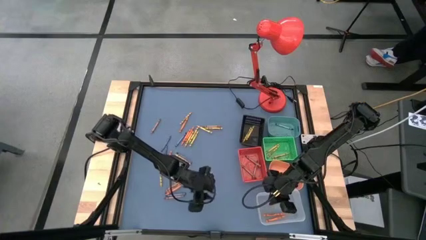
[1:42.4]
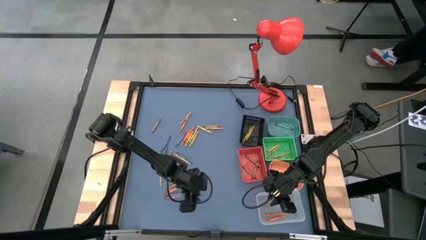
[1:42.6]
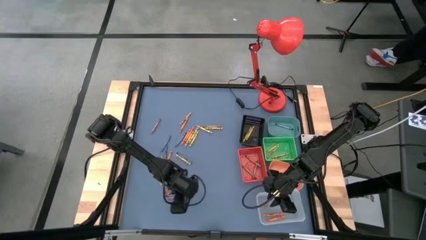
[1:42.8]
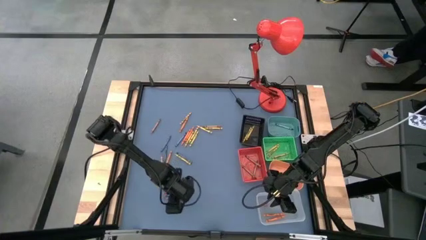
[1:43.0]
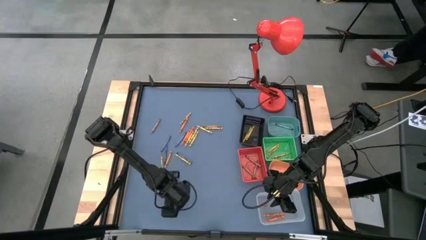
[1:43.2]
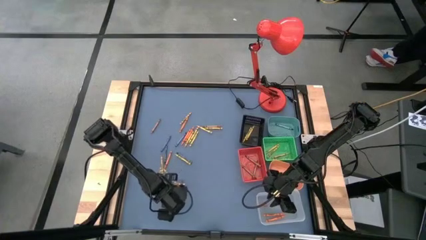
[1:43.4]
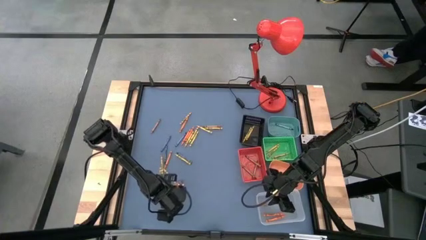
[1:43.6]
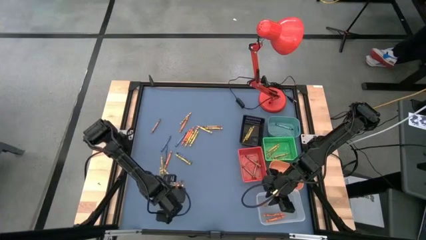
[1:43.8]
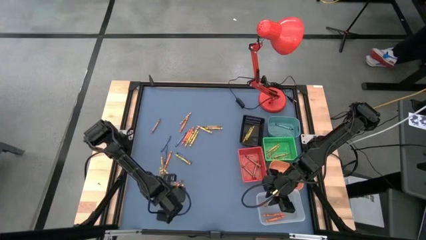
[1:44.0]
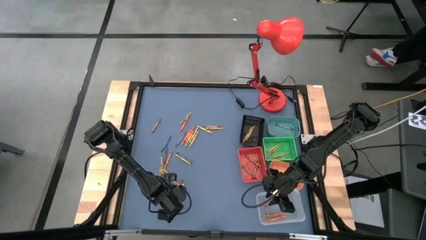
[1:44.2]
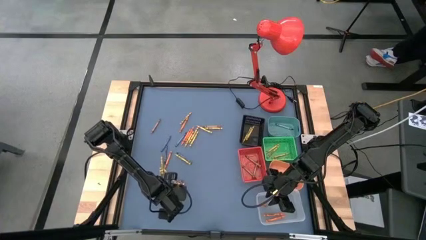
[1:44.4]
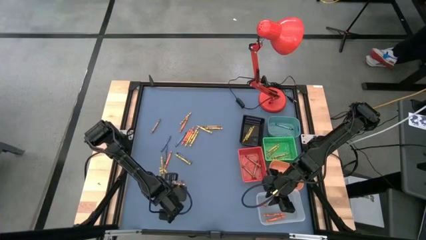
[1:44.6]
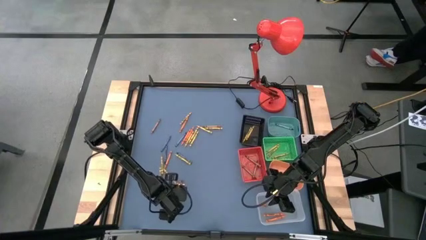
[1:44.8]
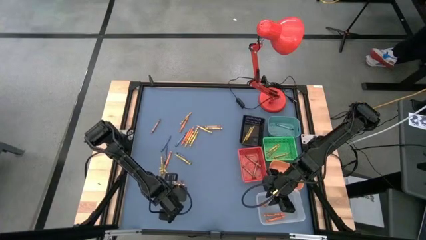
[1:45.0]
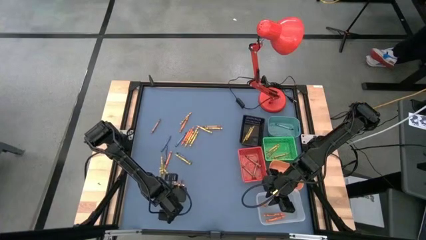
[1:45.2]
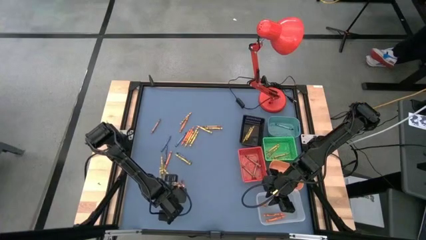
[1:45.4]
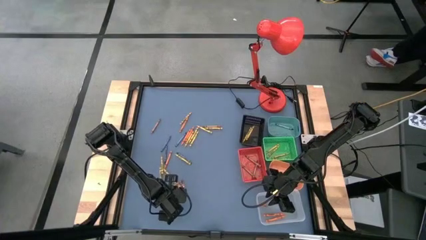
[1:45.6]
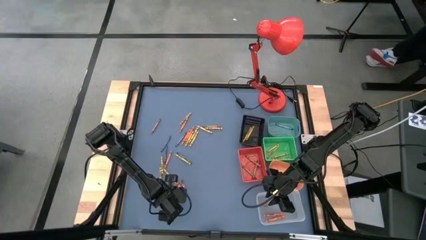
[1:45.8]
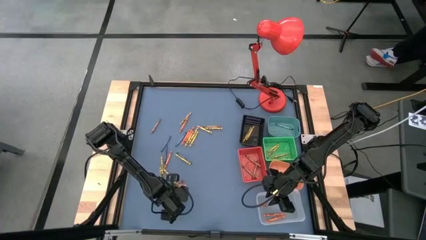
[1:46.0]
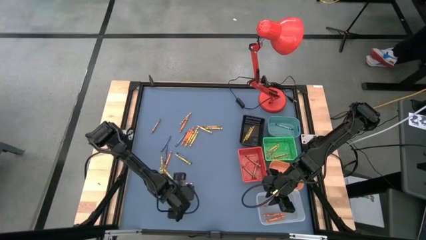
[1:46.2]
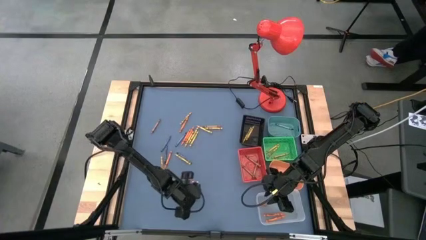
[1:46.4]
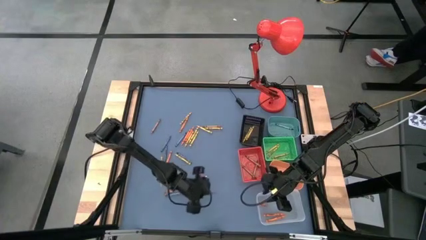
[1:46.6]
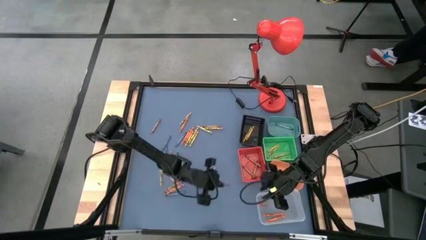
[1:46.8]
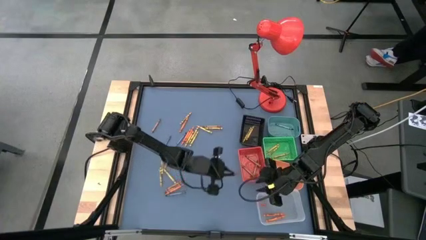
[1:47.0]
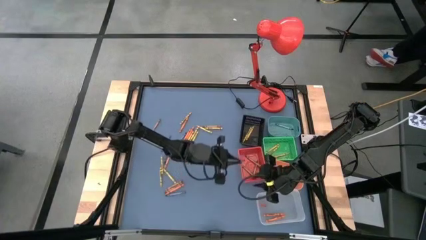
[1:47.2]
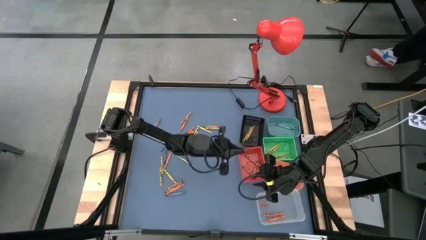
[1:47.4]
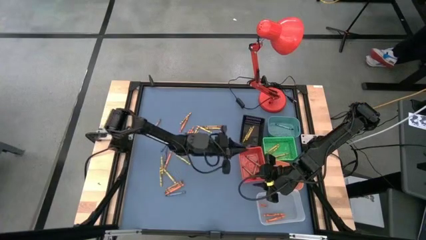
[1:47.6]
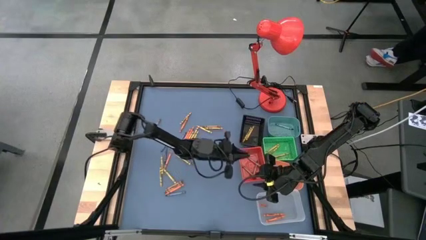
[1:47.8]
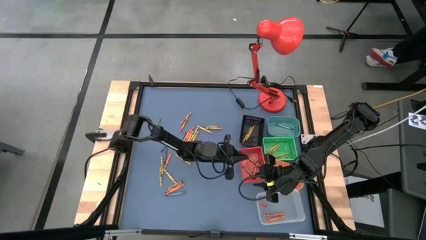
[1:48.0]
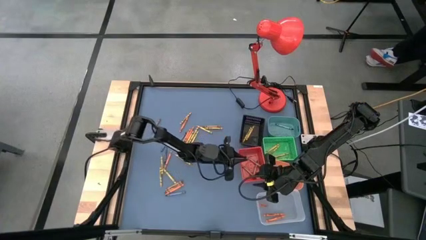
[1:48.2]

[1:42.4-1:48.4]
Task: Sort crayons
Put the brown crayon into the red basket

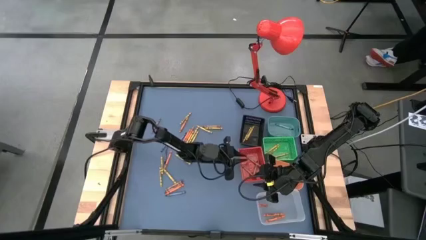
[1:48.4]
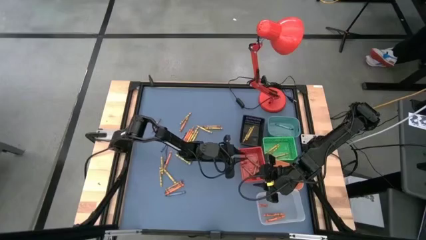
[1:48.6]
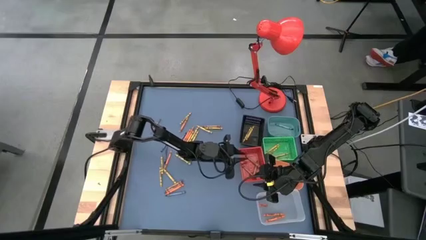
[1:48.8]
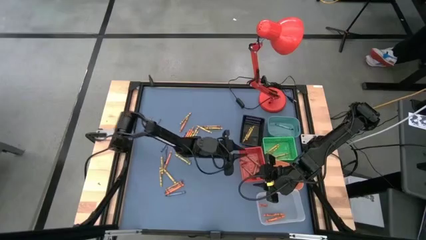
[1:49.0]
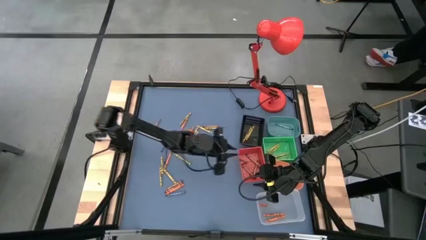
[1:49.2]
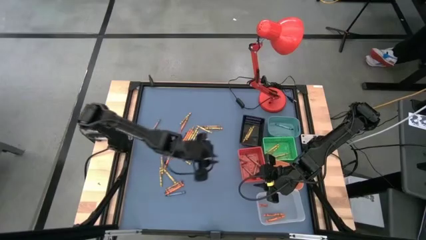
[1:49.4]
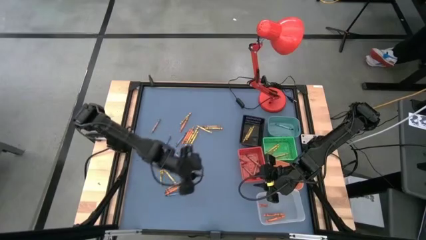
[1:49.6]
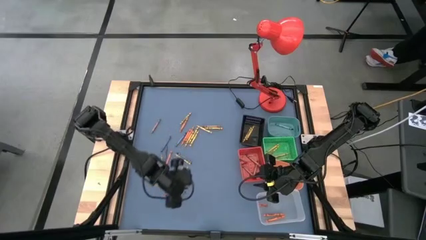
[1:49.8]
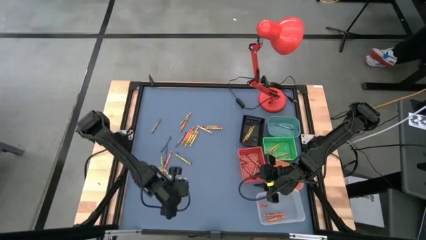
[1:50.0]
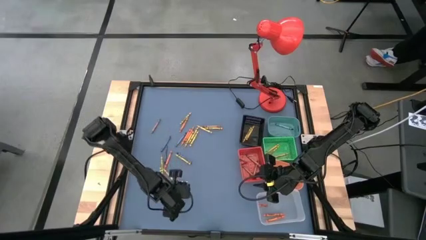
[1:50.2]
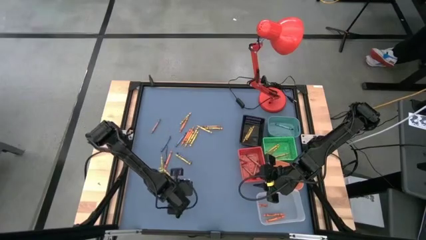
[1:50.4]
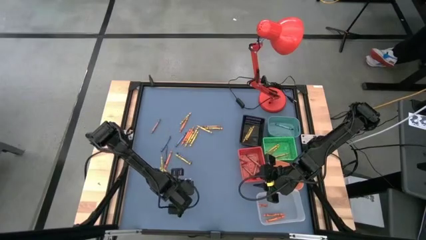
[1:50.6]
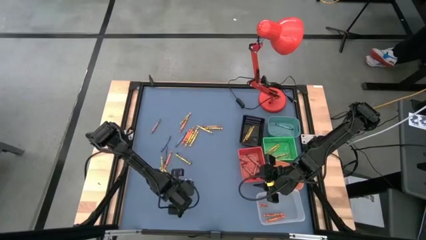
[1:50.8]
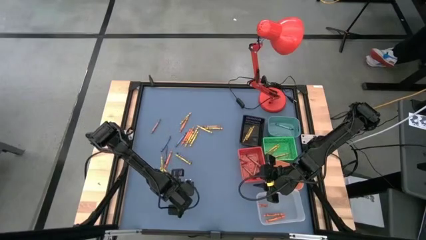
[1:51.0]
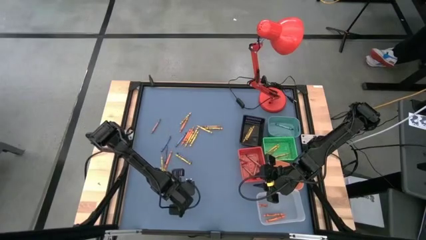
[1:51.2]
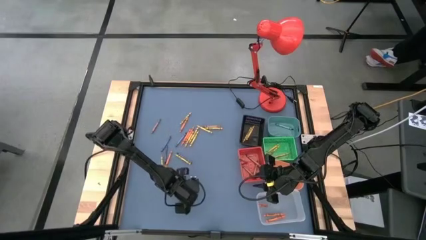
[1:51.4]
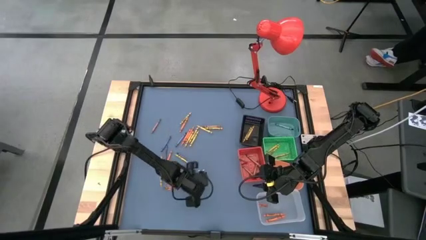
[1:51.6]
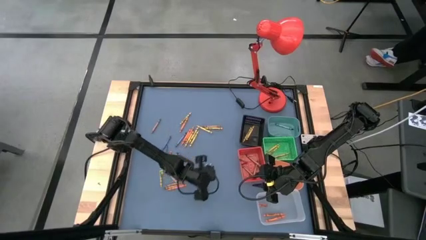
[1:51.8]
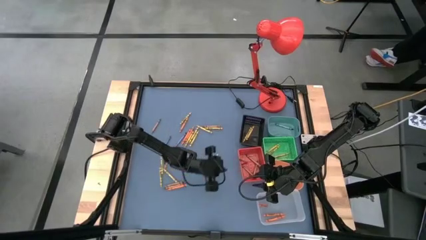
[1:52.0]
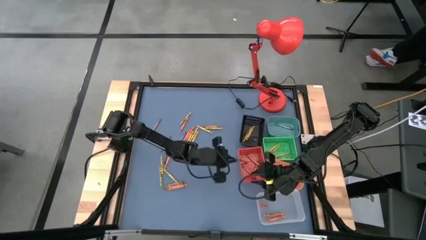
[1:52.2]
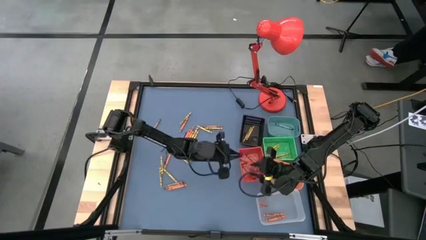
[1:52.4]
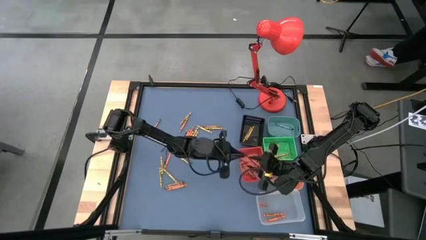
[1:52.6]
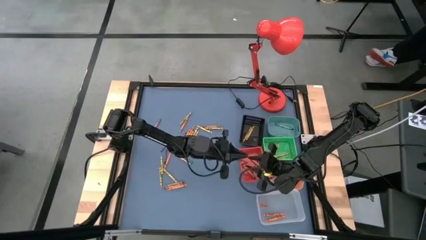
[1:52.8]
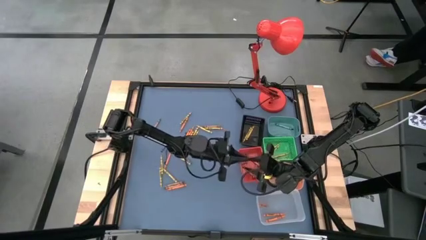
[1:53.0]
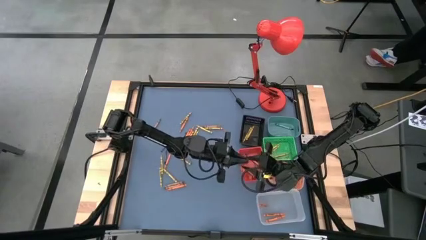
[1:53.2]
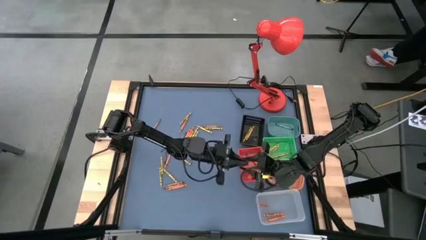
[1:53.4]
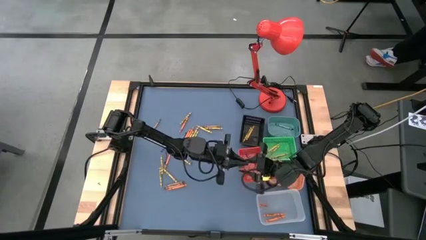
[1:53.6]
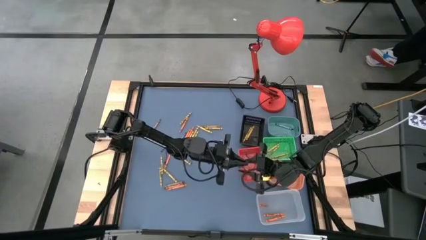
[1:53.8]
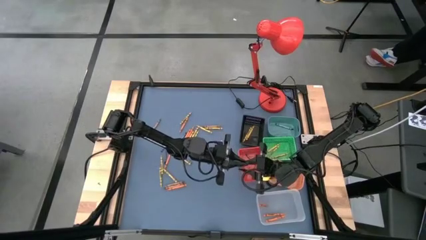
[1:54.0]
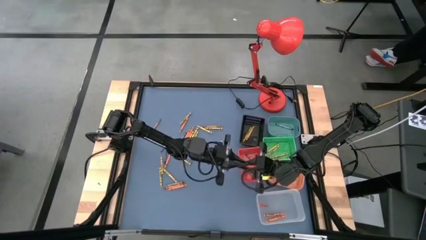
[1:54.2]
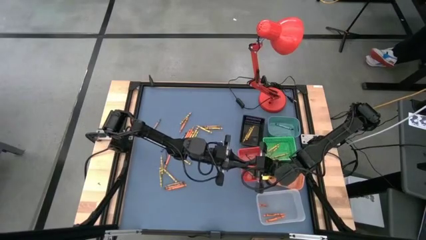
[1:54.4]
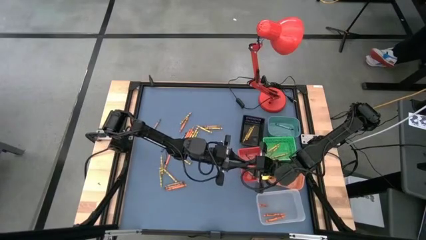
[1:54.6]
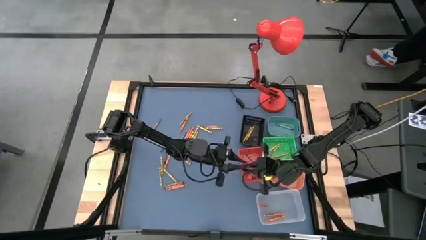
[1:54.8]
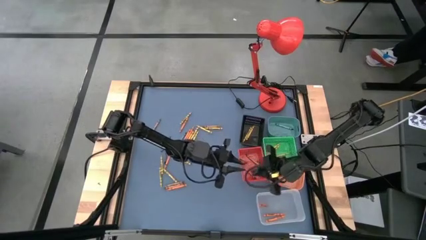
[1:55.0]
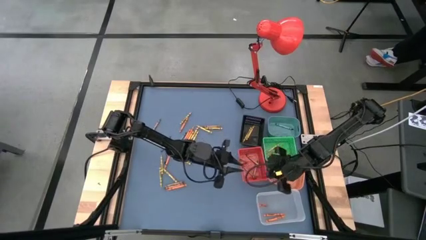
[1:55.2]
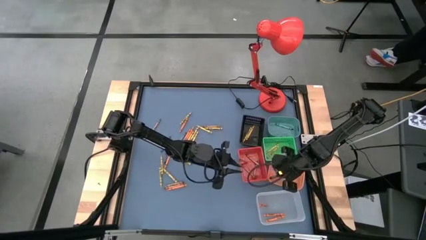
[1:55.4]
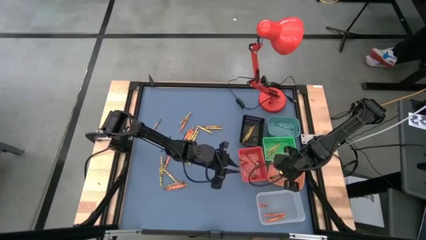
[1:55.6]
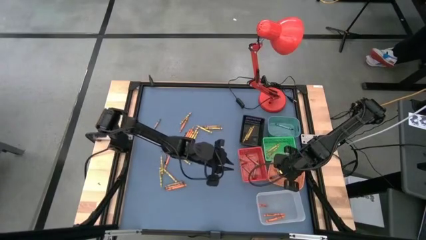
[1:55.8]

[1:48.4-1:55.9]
Put the blue crayon into the orange bin

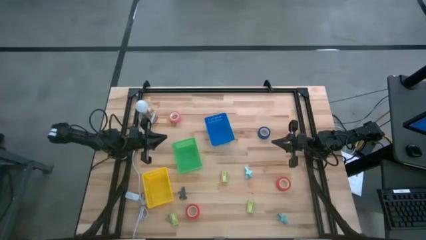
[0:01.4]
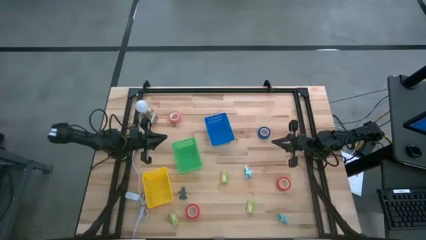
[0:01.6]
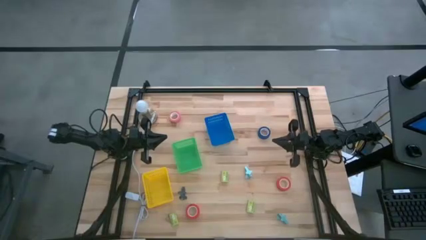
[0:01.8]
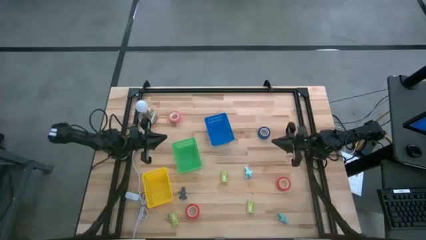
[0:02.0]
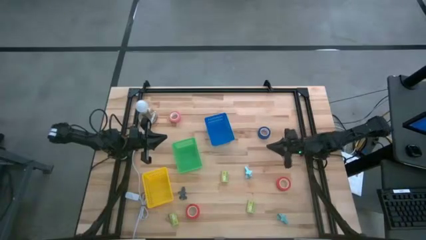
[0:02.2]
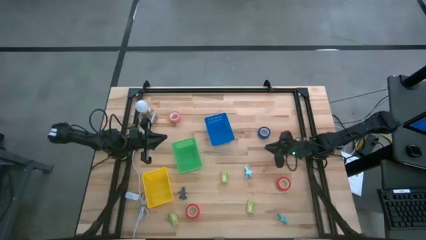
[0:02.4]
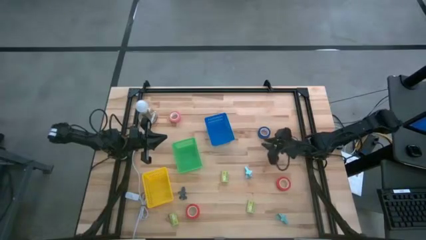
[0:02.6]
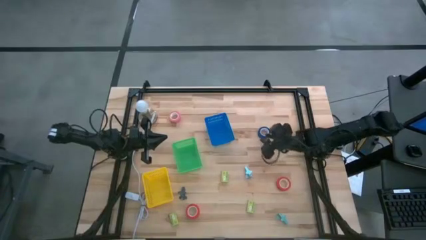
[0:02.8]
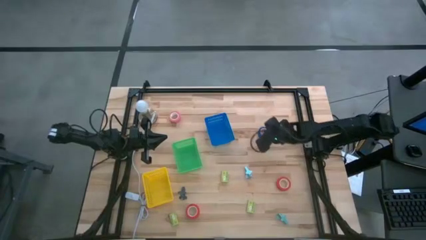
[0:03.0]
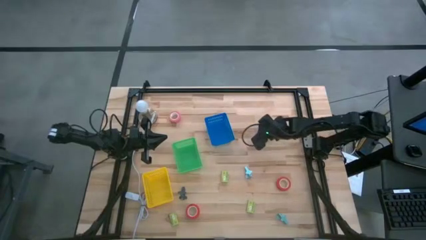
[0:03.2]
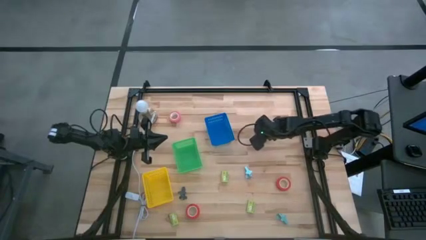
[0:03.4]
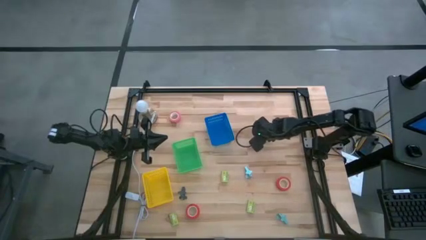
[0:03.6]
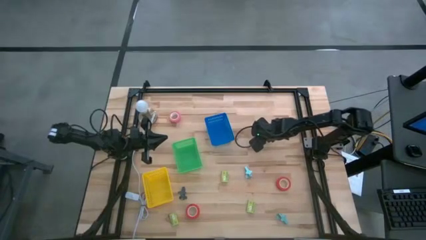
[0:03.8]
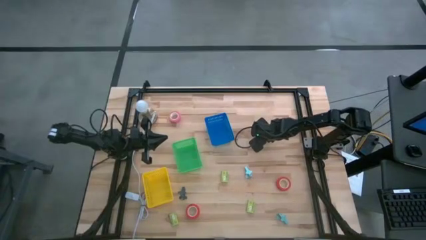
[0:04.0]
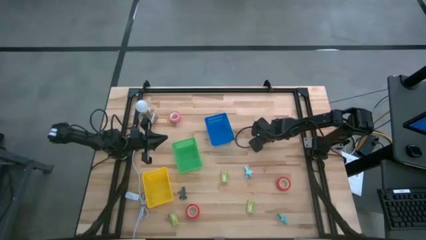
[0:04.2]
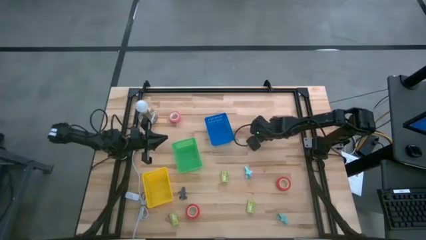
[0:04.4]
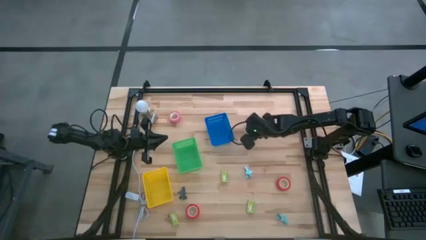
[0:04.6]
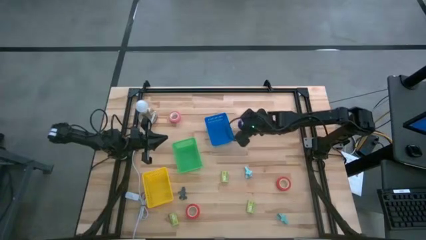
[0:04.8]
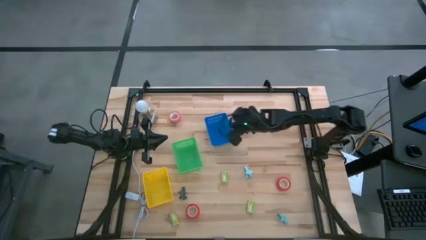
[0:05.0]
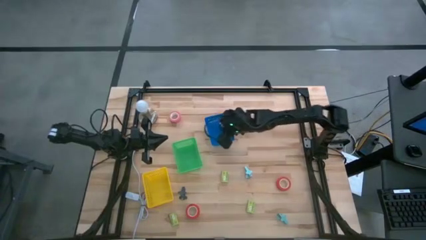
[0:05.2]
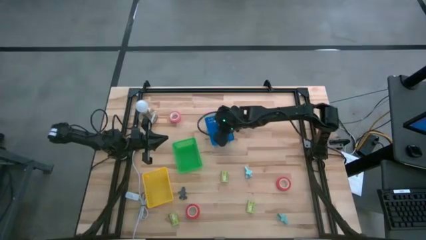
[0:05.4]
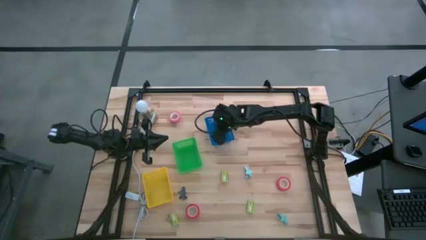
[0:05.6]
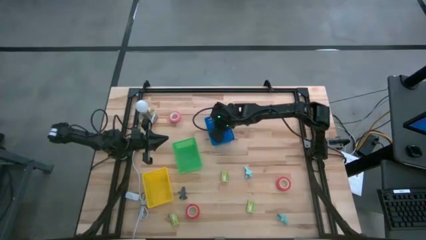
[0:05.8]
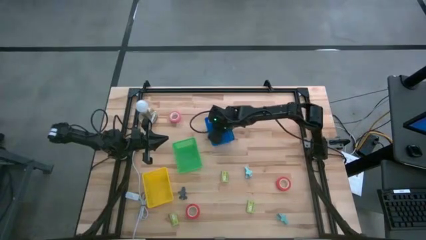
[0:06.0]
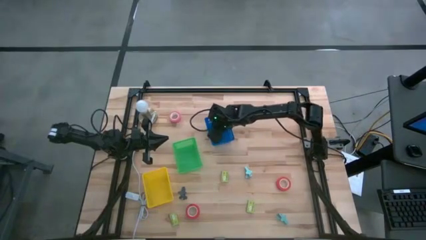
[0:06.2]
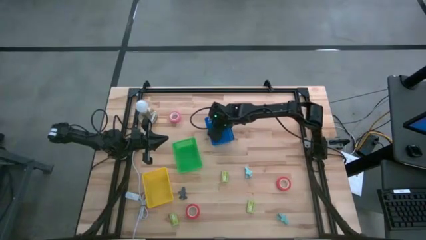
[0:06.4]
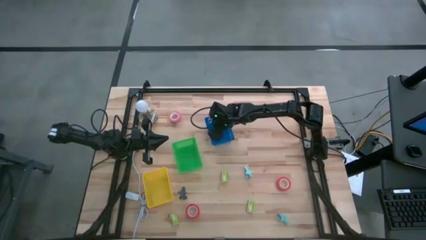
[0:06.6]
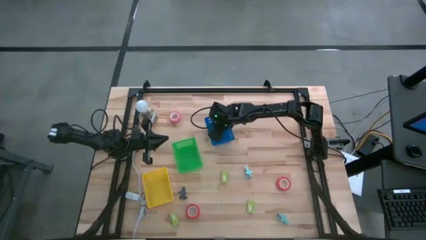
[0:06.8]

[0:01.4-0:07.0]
Task: Pick and place Stapler, Stapler remover, tape
Put the blue tape into the blue basket
